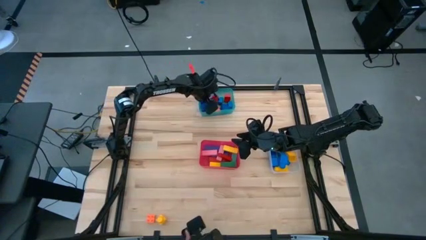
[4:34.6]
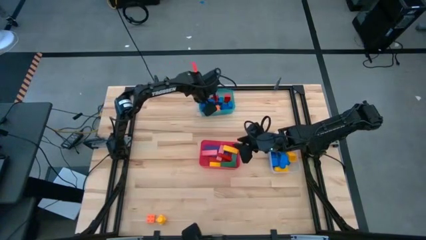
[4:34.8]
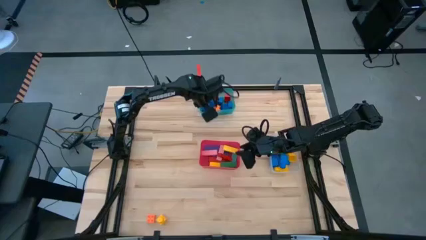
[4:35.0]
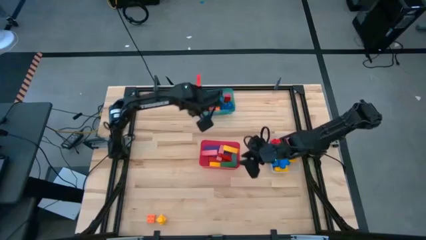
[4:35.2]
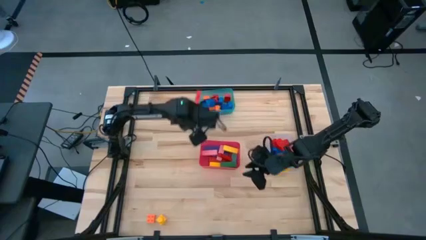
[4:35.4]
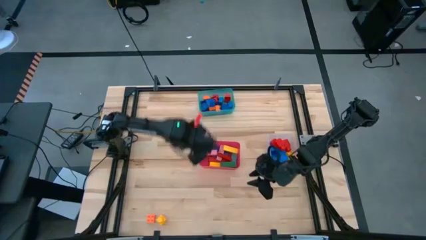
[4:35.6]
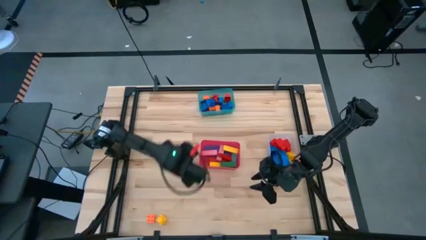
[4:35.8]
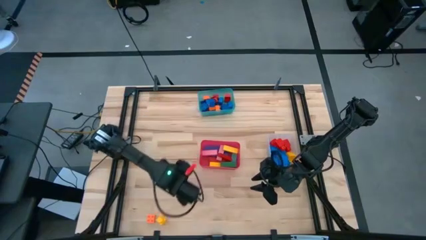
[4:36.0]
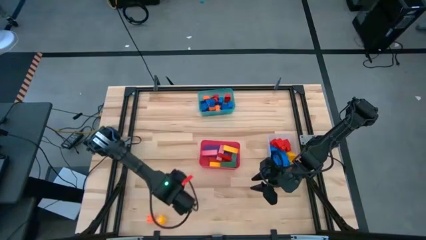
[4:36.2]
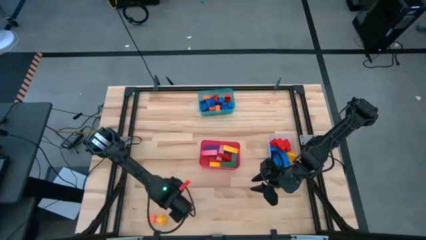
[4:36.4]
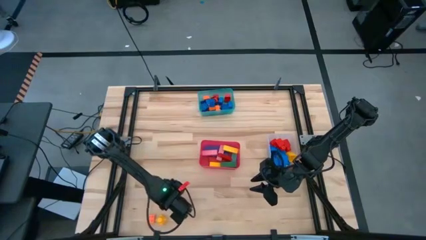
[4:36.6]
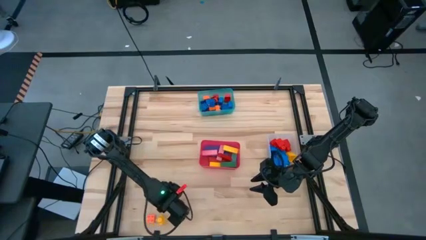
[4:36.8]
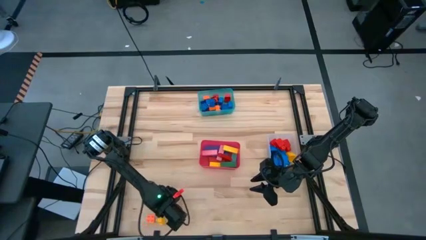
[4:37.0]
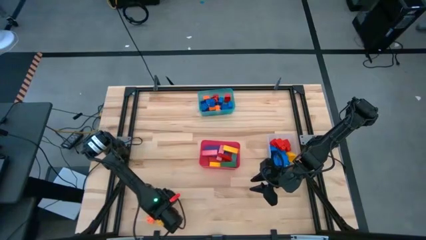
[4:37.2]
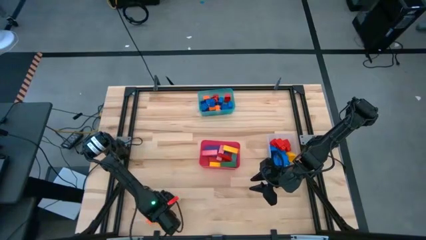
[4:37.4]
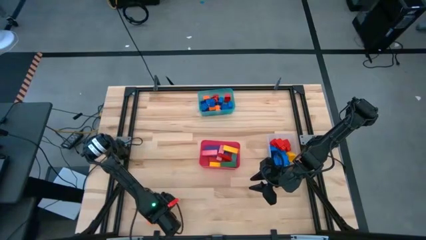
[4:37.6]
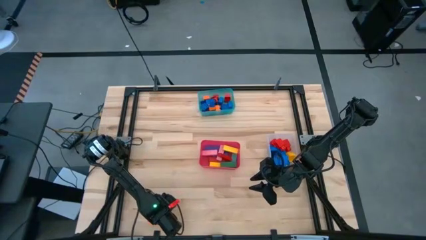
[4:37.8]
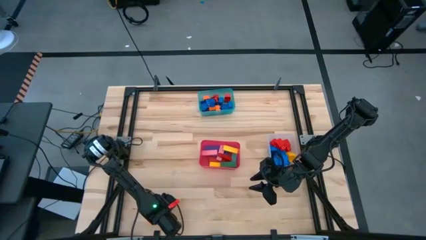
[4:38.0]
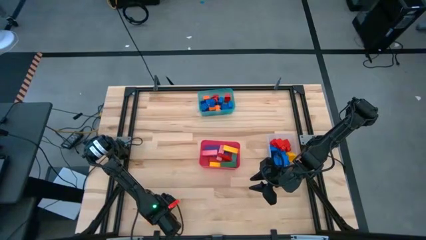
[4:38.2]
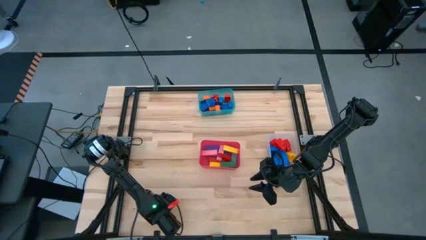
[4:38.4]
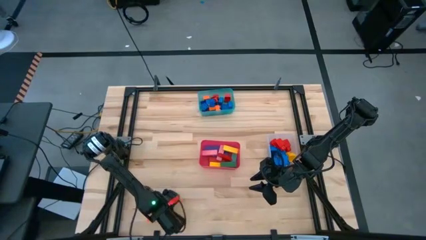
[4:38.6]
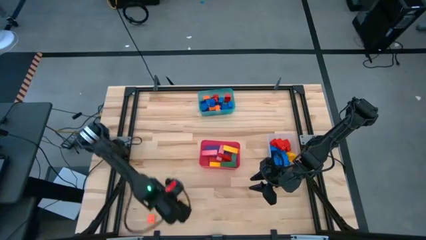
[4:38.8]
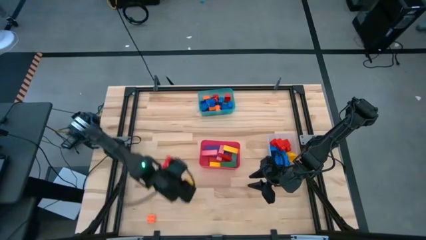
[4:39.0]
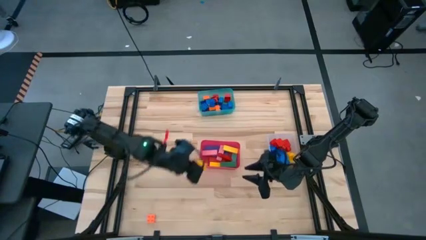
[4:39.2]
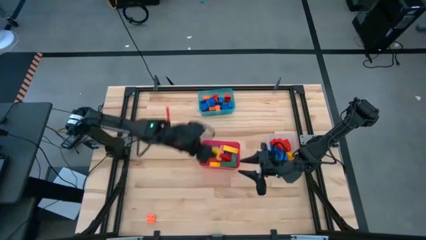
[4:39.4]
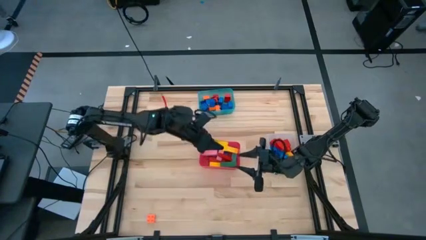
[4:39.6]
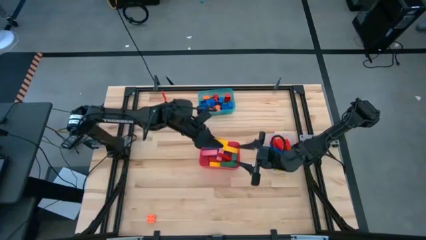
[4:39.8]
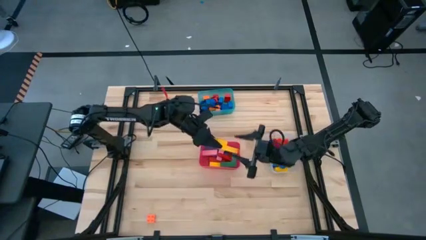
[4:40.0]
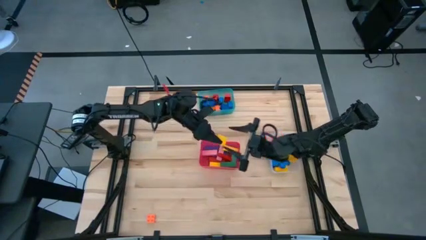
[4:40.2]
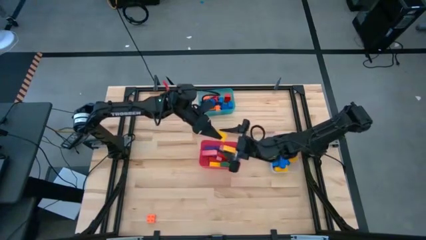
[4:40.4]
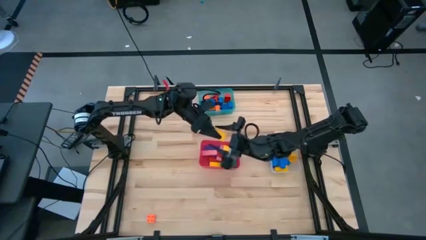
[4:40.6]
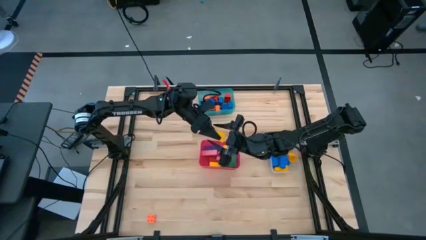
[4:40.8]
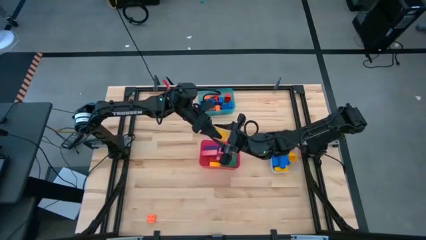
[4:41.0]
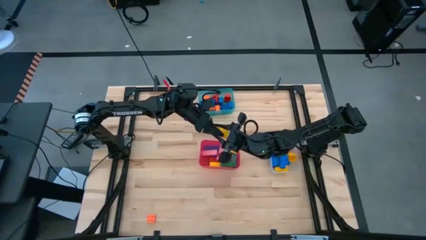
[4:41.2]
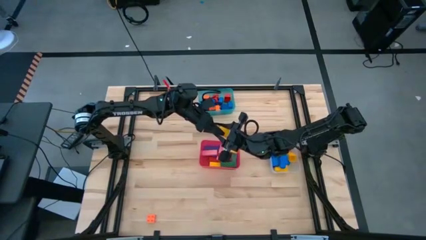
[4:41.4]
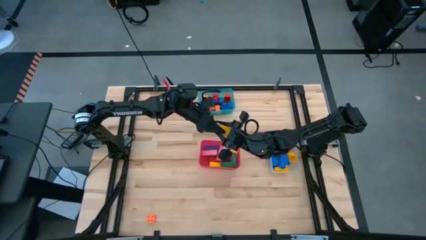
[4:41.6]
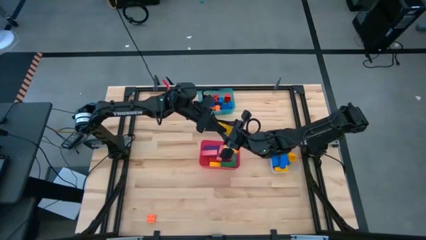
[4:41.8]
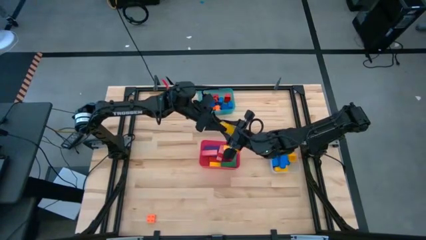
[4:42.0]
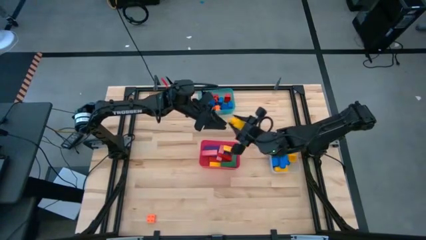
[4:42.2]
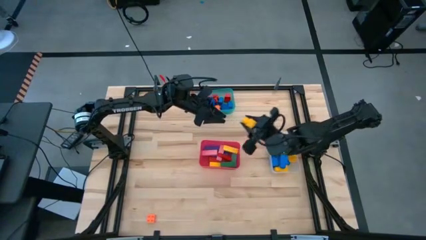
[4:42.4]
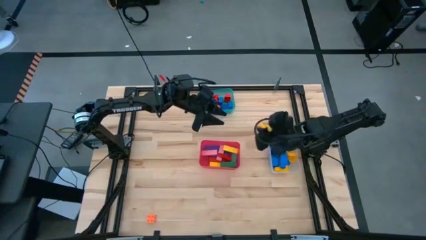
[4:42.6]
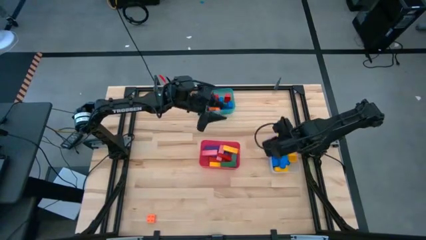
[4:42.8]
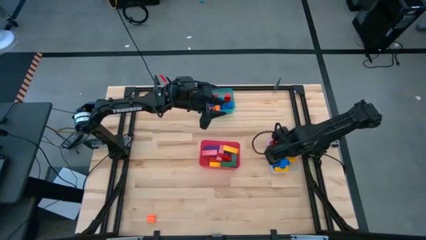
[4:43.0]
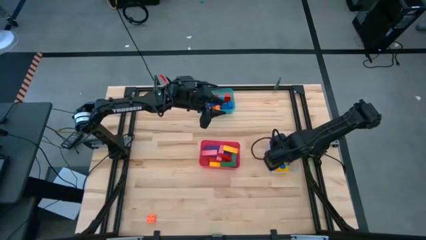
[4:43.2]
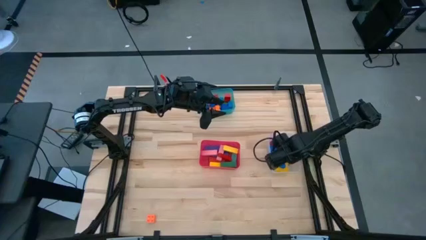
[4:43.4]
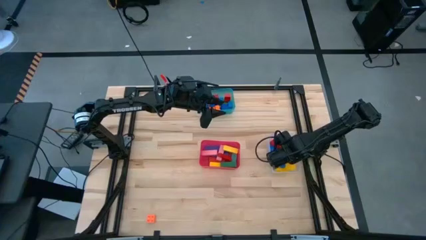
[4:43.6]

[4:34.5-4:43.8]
Task: Sort blocks by size
Put the yellow 1 stud game piece into the transparent bin

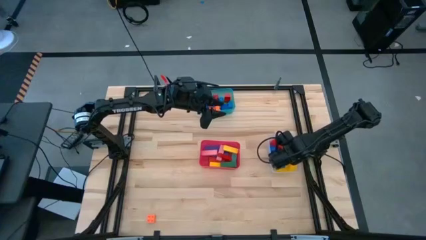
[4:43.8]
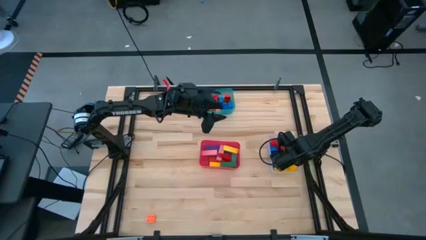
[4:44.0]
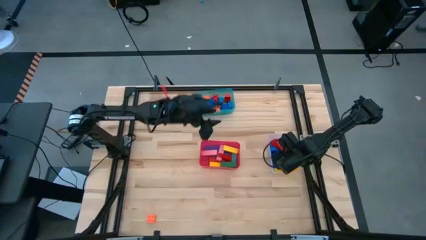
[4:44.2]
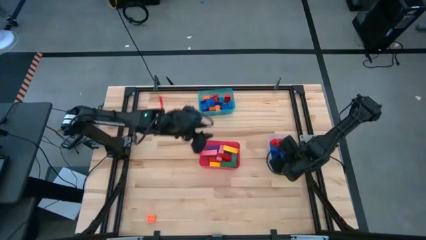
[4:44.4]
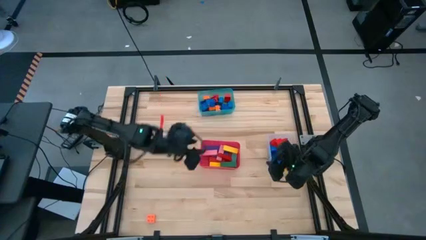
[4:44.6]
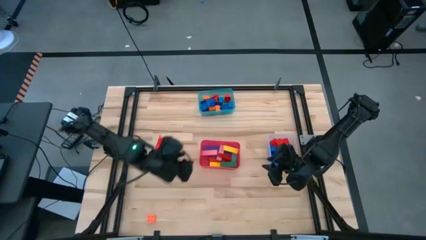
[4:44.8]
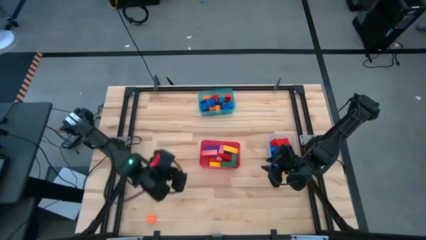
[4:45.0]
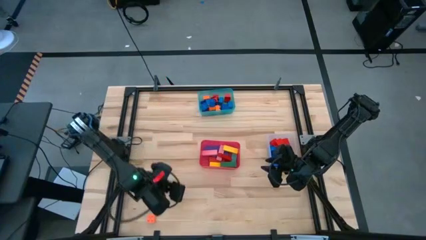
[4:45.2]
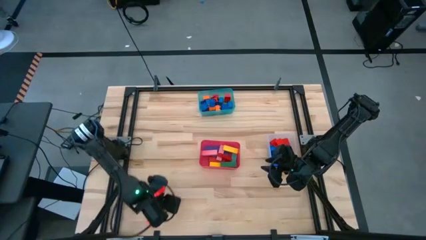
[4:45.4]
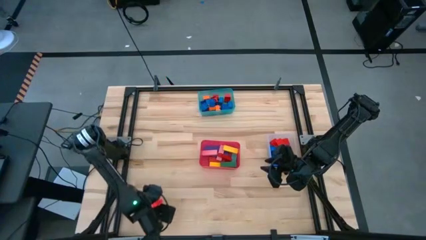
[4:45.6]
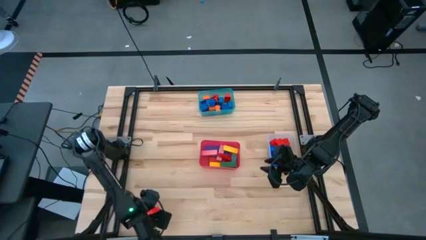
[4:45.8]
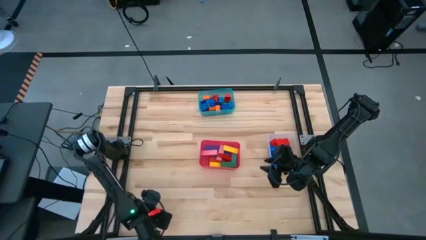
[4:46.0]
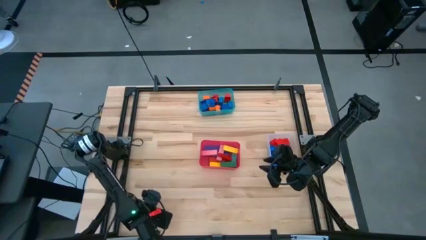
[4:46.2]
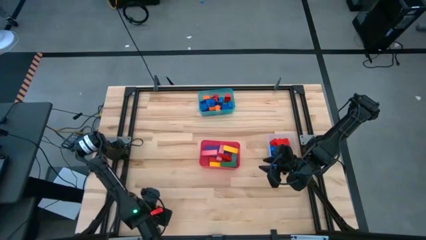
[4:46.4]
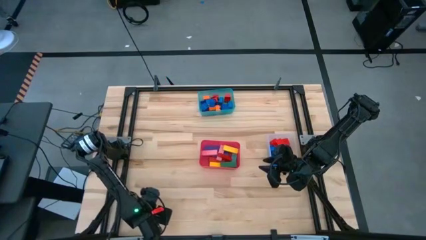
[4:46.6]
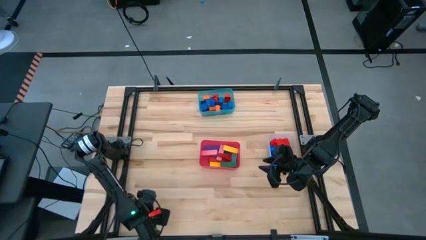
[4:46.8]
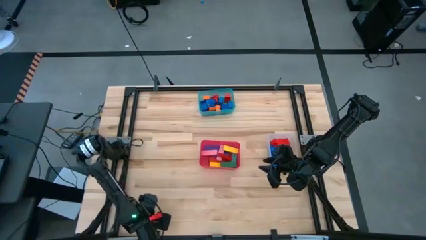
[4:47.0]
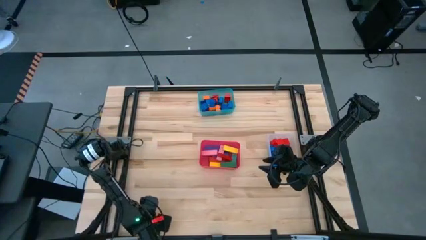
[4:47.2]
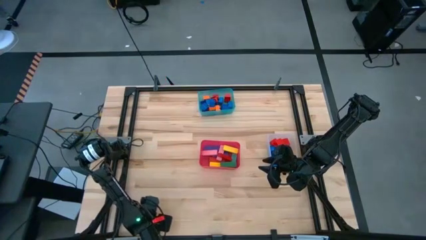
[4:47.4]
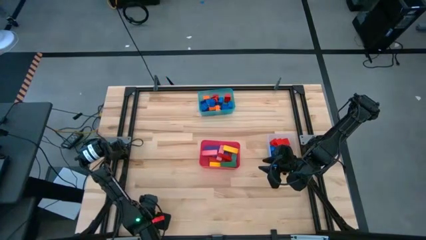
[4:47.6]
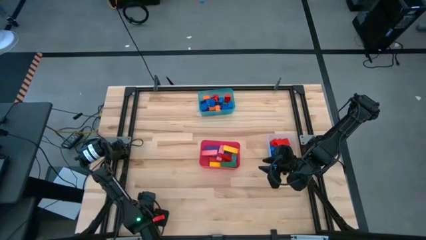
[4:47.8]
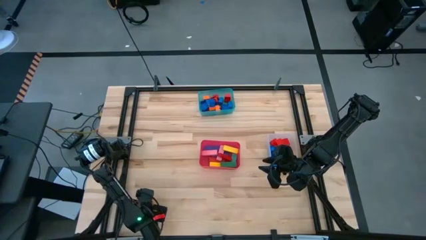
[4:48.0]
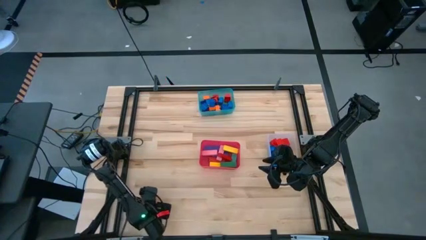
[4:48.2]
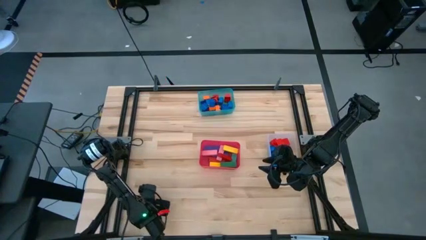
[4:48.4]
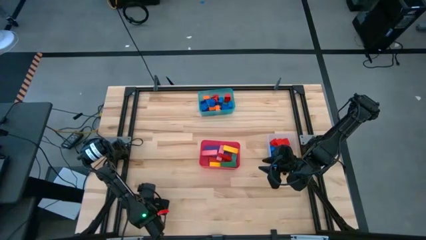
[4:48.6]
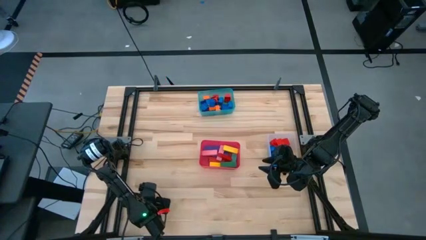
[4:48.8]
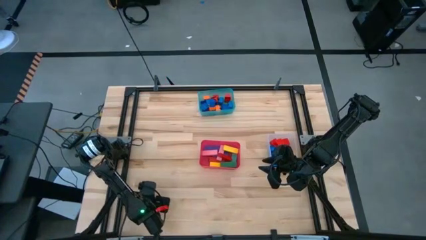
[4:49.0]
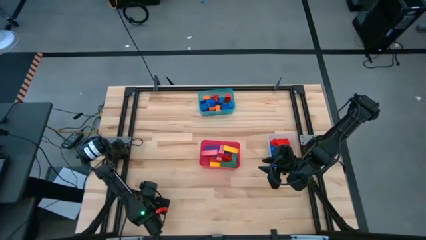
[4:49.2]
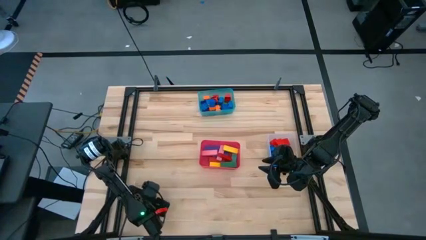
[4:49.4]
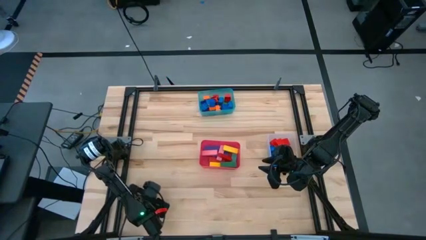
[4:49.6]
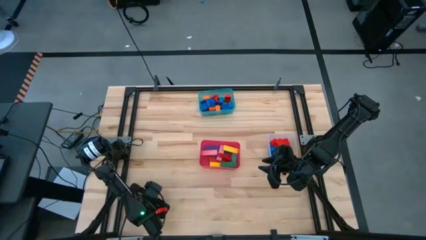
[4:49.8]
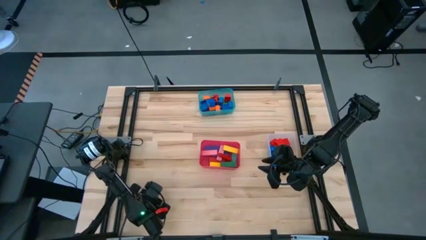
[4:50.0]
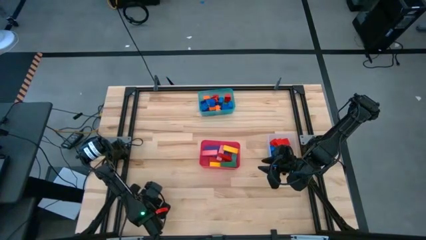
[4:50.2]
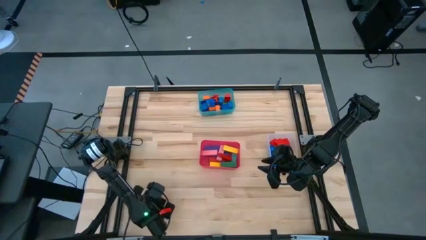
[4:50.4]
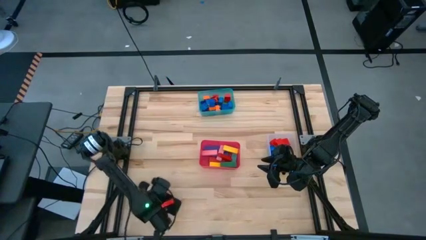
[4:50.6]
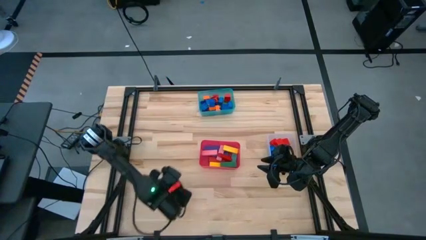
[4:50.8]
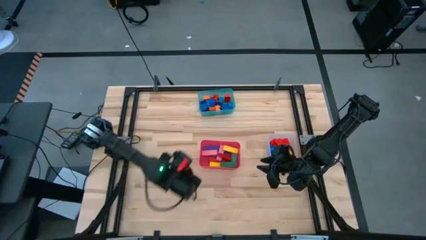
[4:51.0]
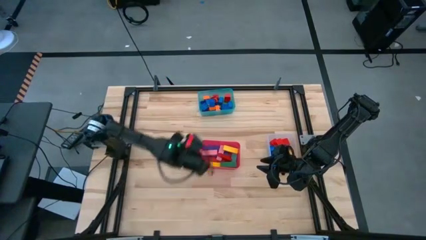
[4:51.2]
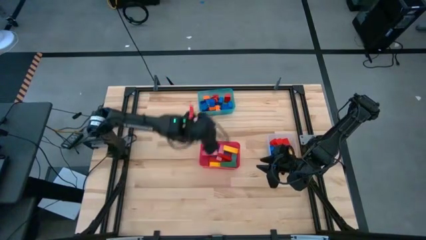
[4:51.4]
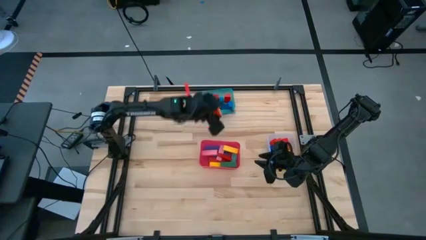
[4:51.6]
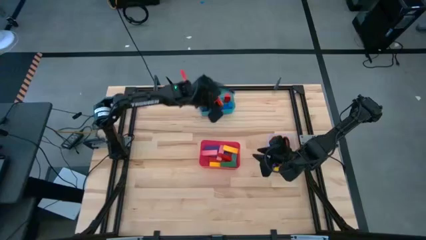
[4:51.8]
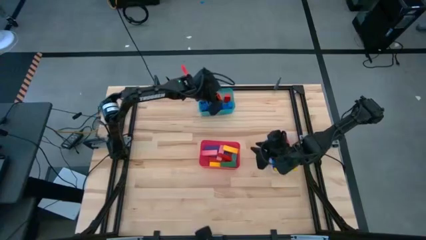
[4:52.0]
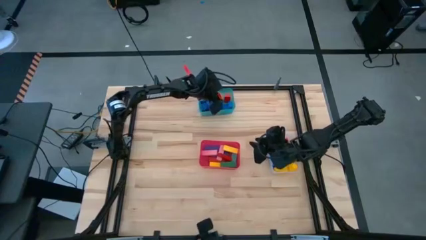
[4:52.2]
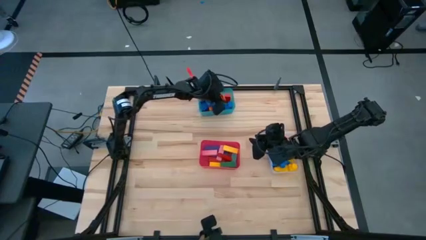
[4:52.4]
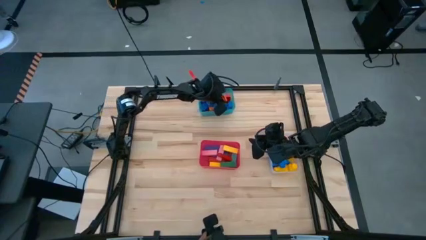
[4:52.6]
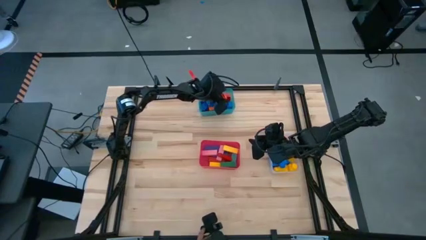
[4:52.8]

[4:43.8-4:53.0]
Put the orange 4 stud game piece into the blue bin
